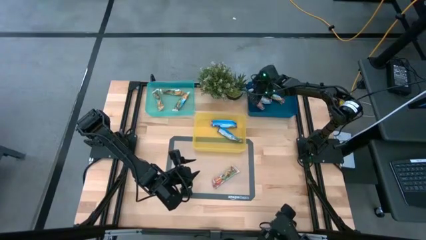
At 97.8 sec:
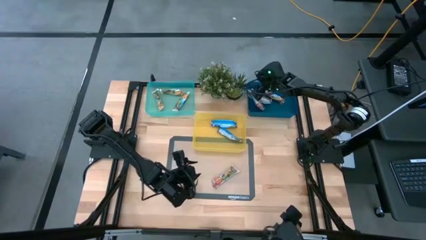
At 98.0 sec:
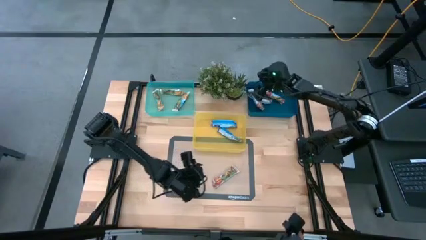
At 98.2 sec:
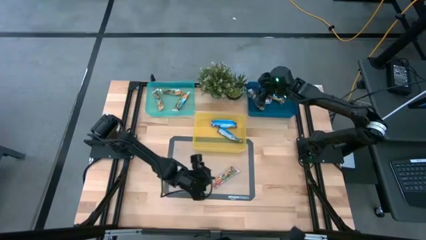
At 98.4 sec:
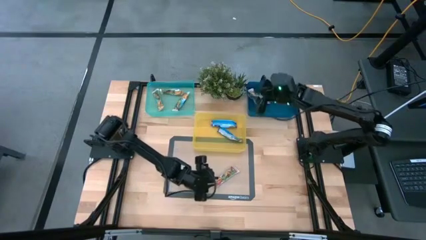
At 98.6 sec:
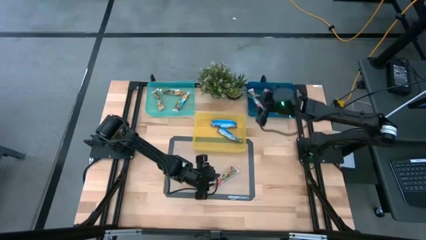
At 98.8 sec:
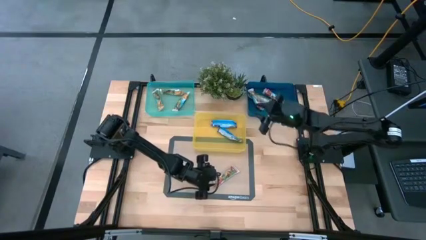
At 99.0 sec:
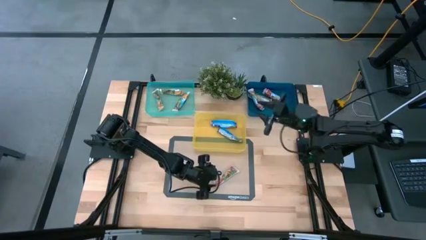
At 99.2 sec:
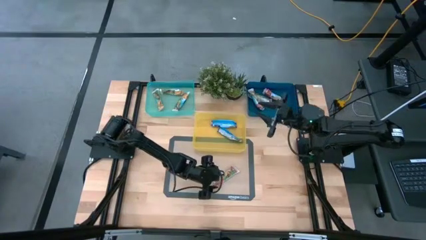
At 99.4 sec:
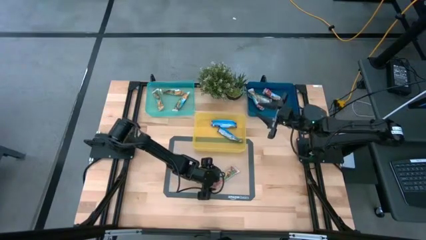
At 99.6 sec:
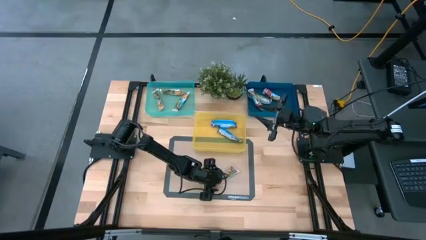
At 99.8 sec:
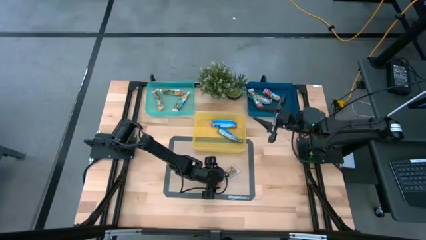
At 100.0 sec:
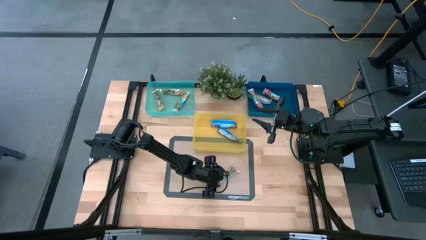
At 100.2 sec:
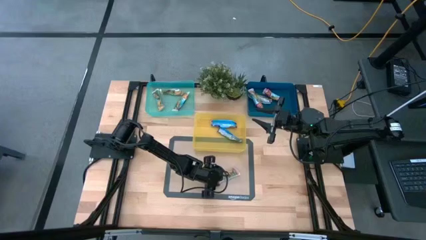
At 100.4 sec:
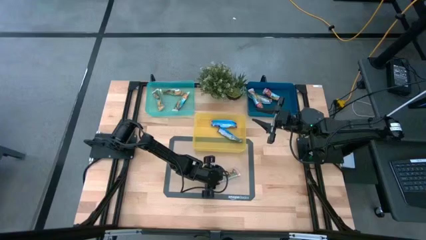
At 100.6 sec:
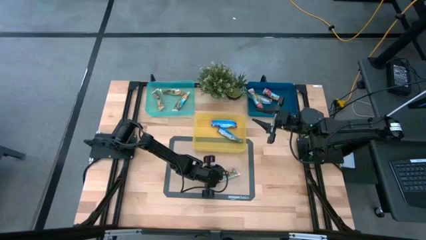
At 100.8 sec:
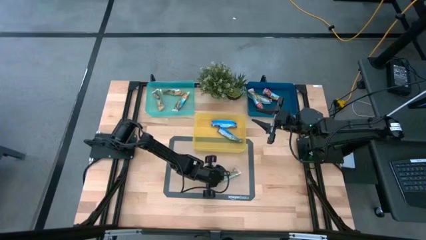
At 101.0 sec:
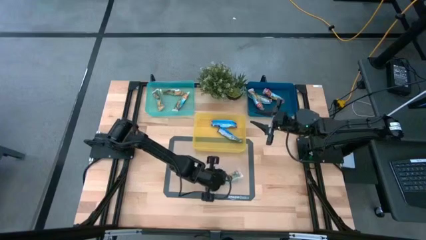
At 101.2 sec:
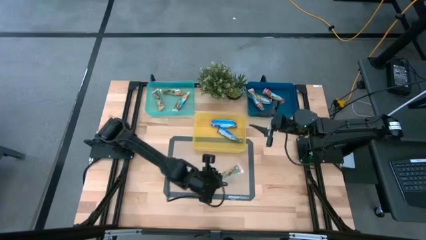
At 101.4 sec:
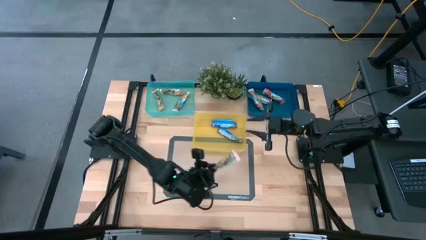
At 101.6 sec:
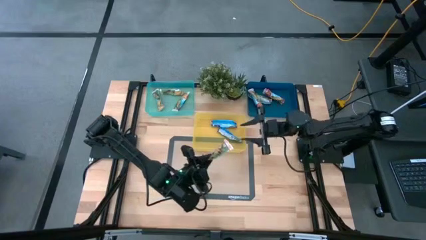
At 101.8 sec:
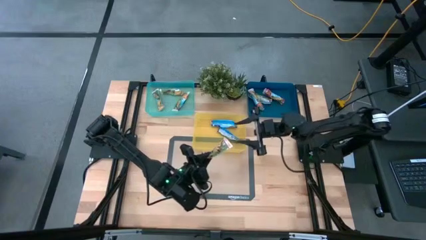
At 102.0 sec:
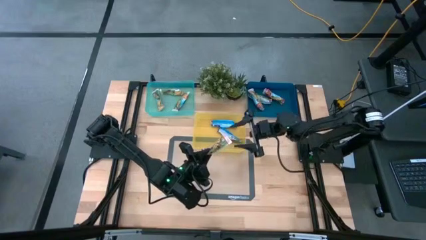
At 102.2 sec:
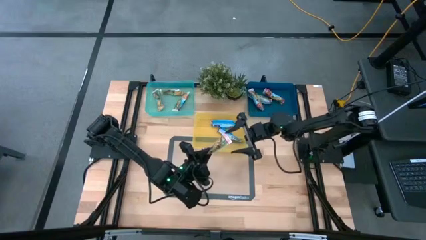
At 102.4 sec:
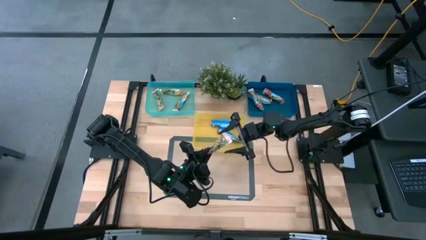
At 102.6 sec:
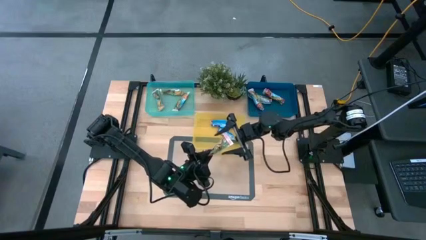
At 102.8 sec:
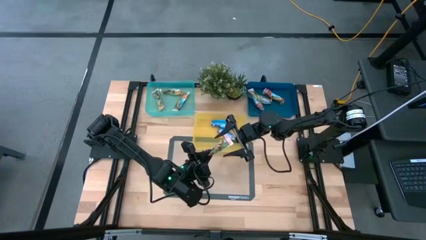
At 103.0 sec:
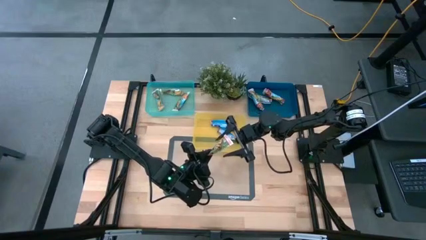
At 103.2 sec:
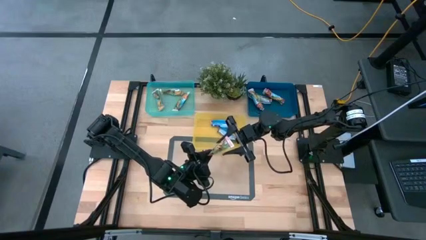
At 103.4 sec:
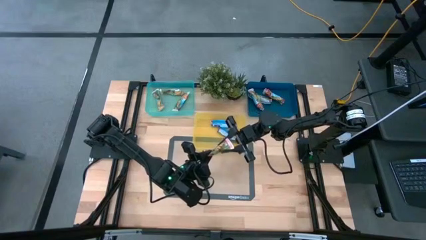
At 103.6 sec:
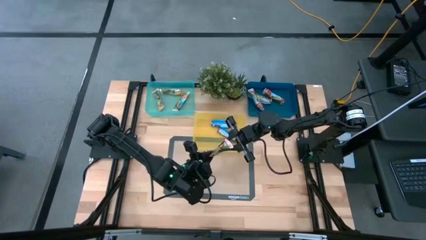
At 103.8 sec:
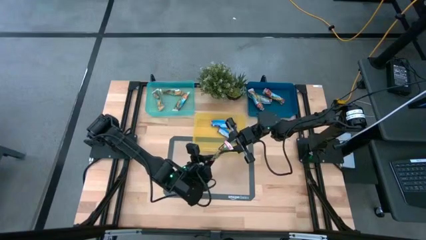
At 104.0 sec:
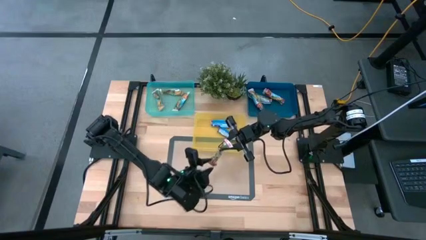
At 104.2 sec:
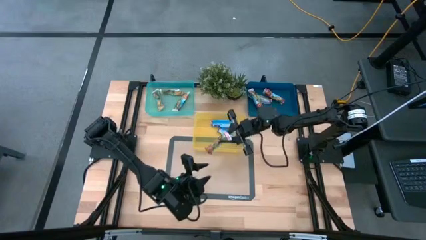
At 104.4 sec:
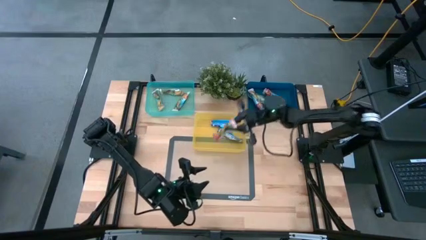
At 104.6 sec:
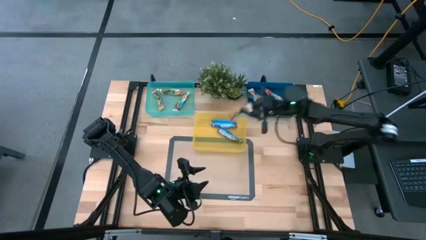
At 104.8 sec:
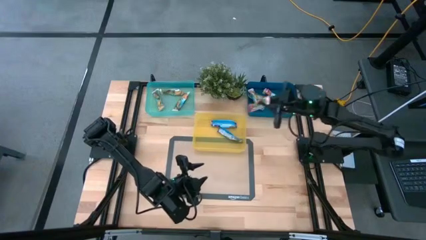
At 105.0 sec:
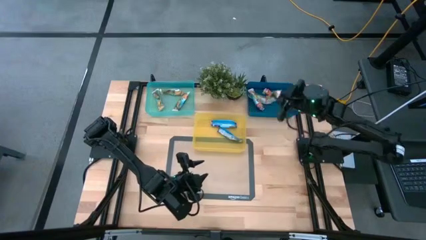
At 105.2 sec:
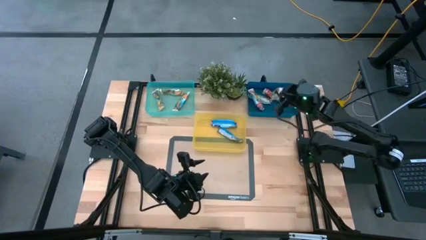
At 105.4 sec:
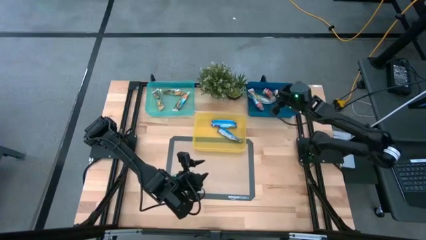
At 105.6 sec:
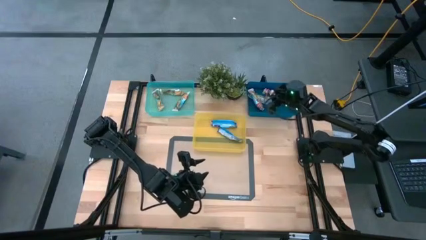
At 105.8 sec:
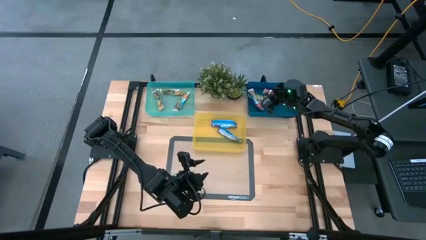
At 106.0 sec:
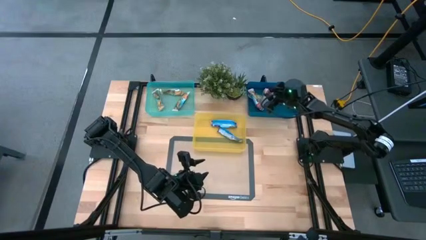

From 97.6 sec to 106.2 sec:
Task: Pick and place Granola Bars by type
Put the red granola bar into the blue bin

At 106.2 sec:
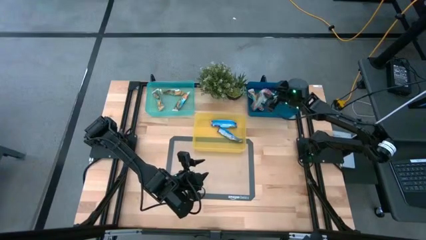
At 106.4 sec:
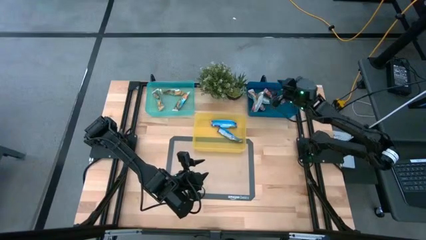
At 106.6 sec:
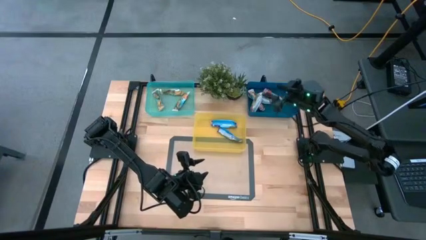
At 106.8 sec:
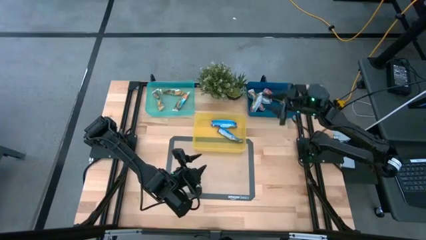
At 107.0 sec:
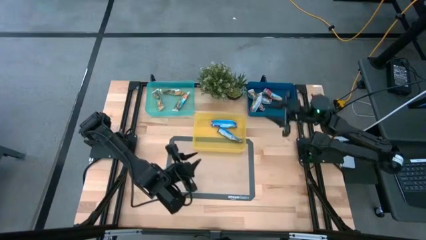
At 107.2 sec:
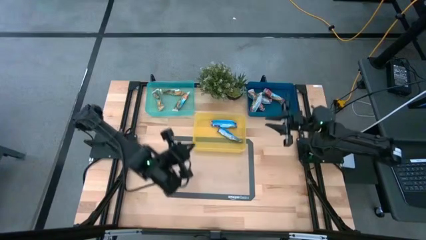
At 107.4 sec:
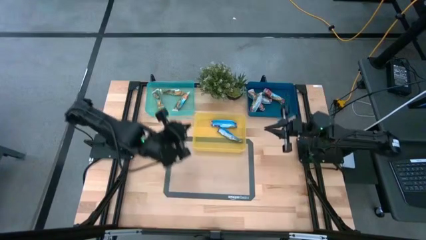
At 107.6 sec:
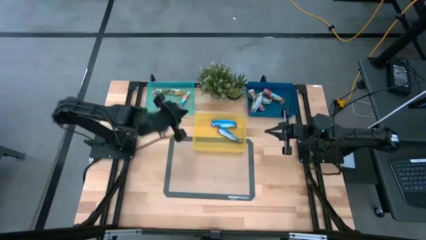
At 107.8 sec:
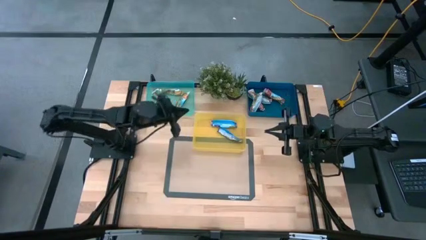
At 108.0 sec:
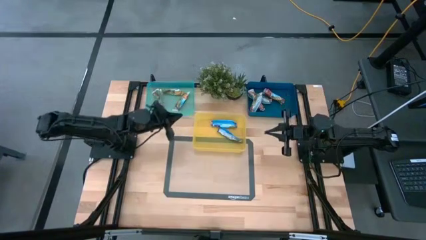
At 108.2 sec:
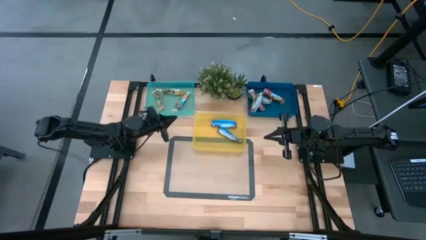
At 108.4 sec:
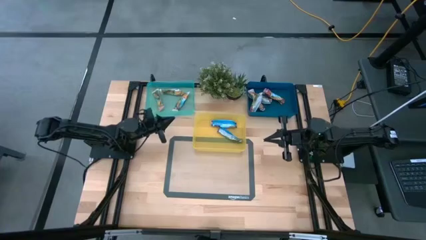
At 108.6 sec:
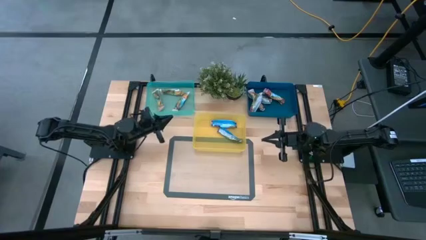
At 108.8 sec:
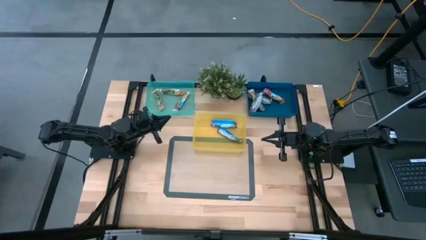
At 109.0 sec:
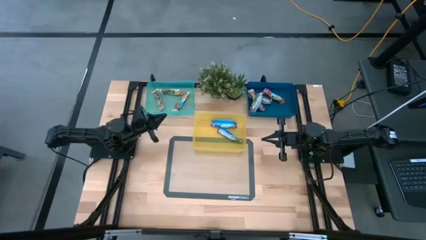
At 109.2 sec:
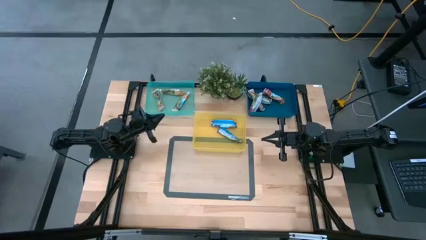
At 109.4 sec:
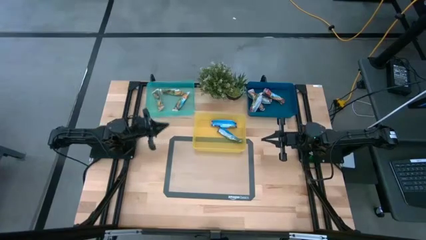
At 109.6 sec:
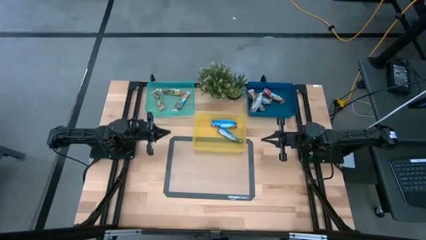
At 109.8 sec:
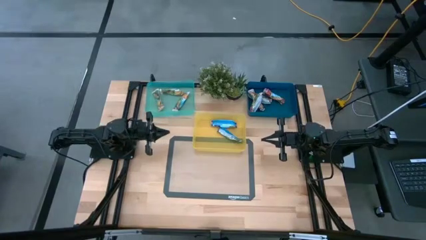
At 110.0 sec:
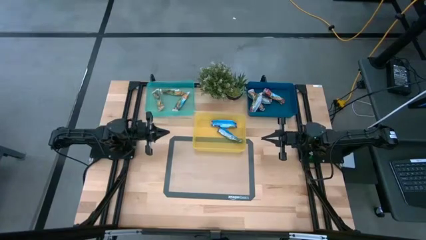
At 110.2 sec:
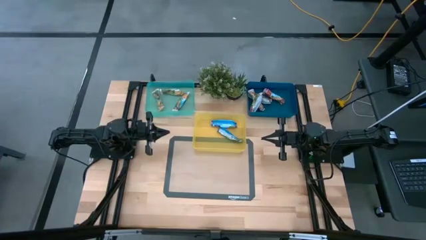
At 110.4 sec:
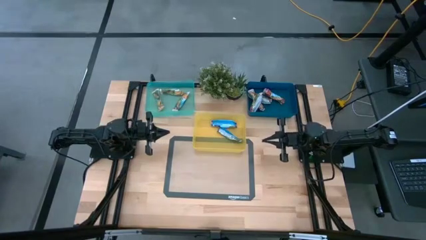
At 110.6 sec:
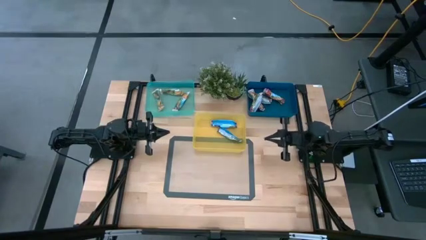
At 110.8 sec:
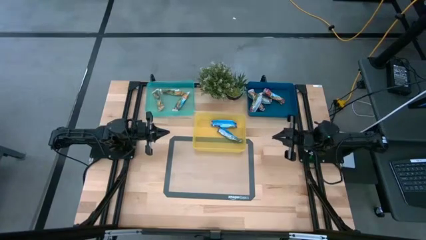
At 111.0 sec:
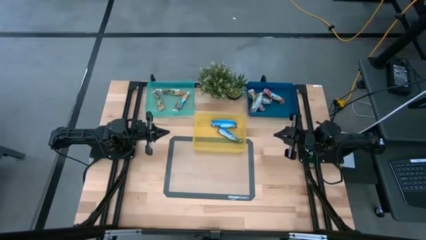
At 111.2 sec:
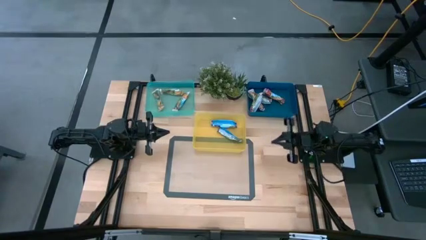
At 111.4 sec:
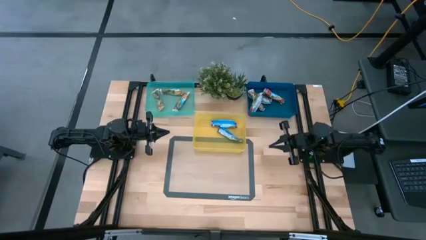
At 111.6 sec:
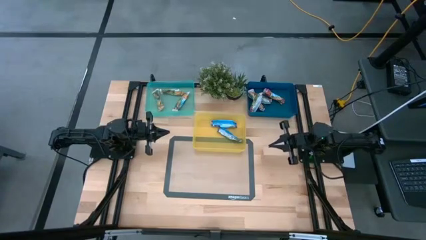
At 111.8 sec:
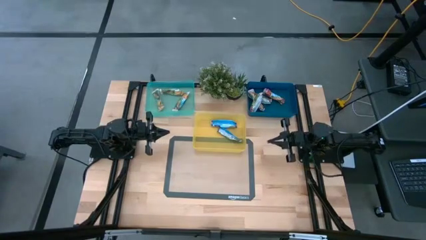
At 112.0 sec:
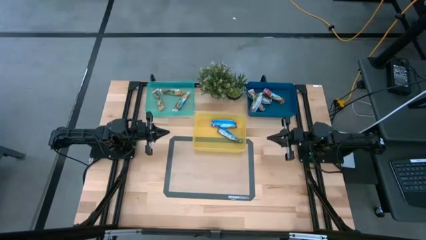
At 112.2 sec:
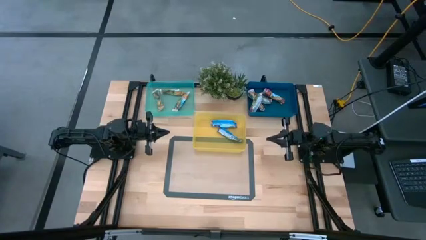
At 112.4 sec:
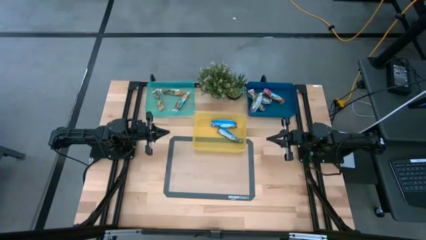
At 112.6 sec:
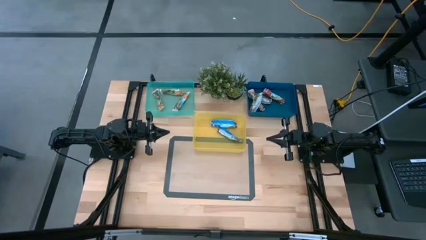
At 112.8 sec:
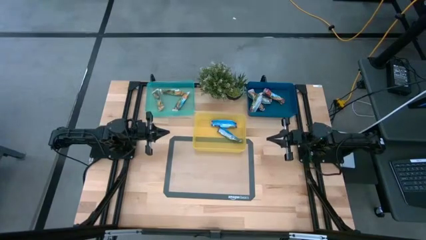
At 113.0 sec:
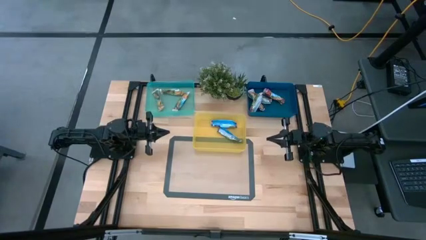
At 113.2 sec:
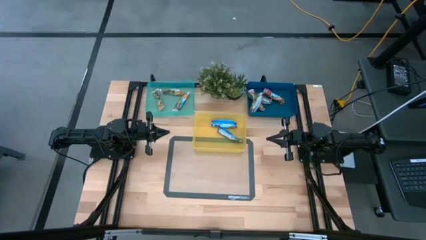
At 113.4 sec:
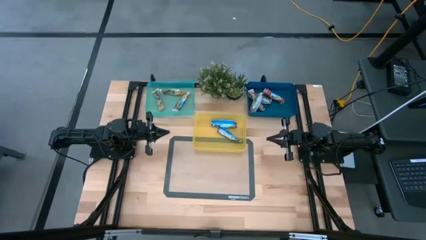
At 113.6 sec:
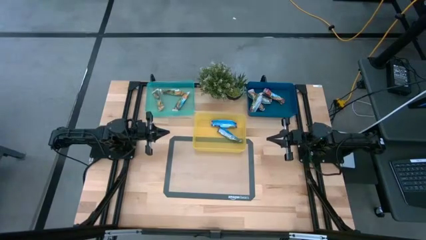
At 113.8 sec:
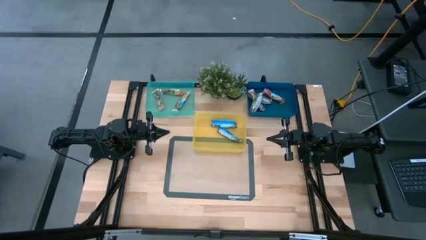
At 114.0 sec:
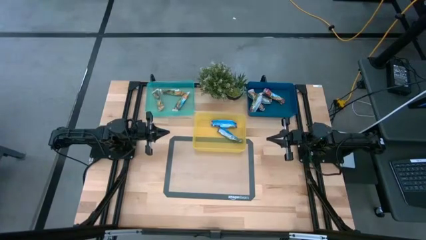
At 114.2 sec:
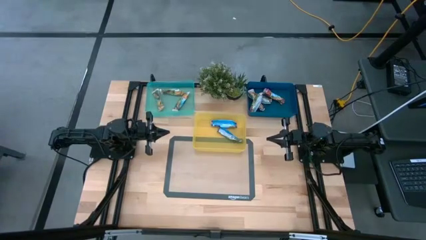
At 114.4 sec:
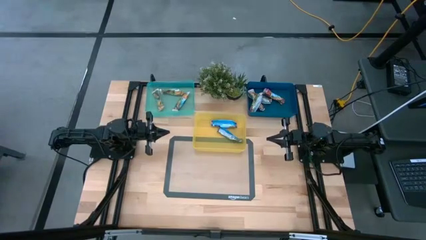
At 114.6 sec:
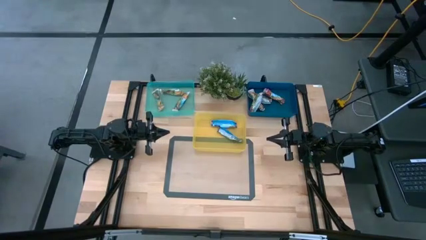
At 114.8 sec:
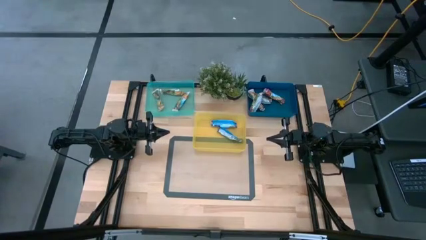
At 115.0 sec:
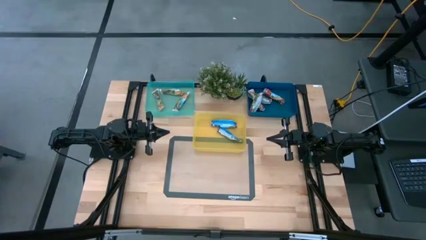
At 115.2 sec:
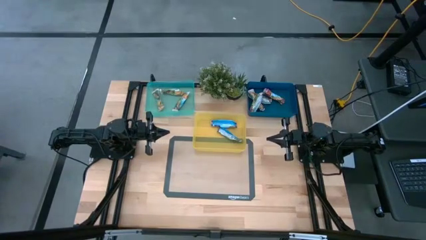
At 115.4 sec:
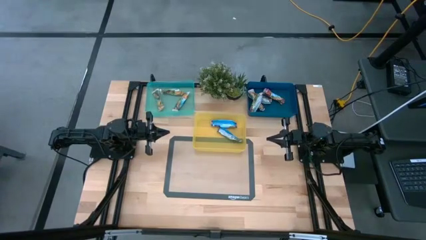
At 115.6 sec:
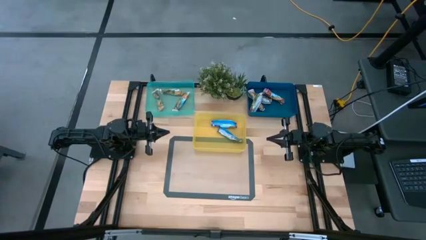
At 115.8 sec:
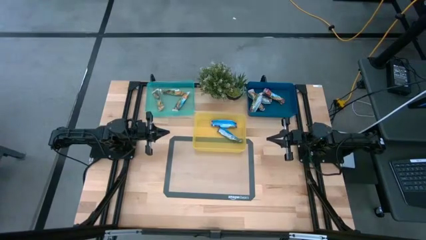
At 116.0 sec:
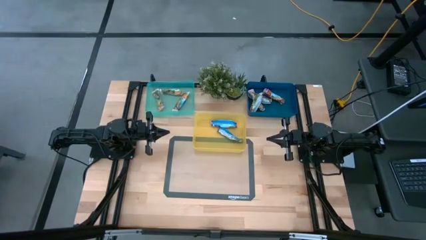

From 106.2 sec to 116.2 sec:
Return to Home Position
